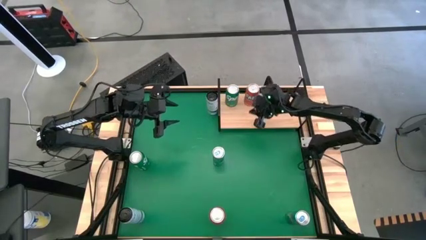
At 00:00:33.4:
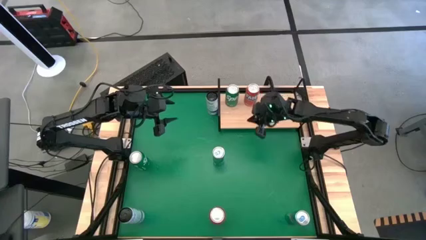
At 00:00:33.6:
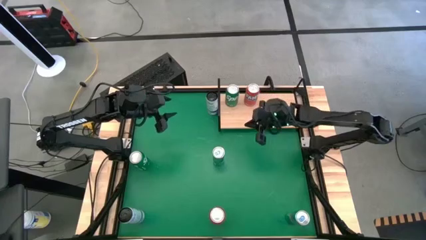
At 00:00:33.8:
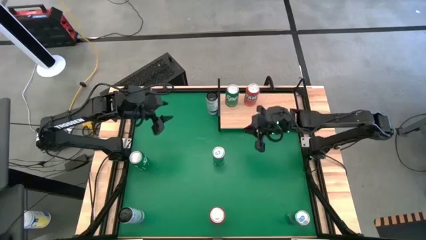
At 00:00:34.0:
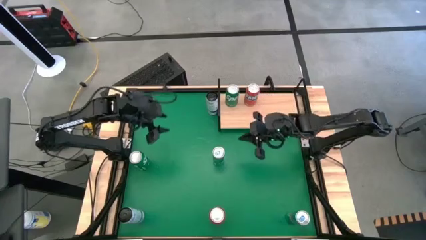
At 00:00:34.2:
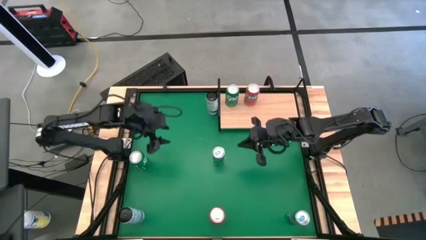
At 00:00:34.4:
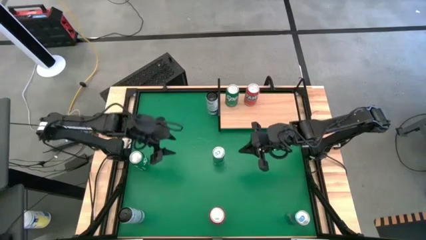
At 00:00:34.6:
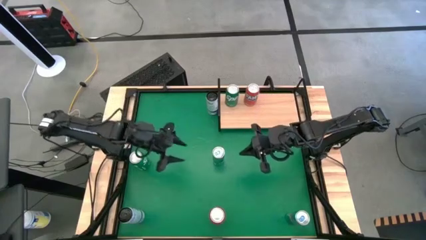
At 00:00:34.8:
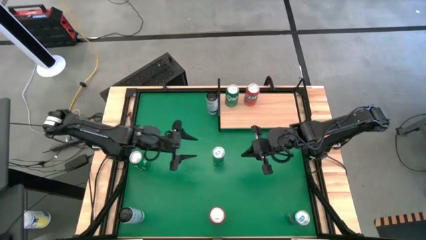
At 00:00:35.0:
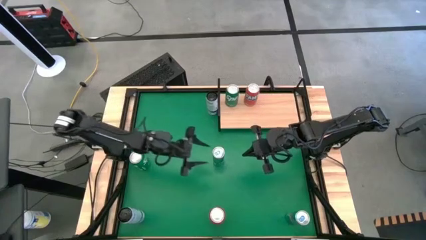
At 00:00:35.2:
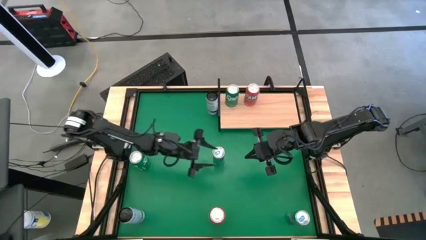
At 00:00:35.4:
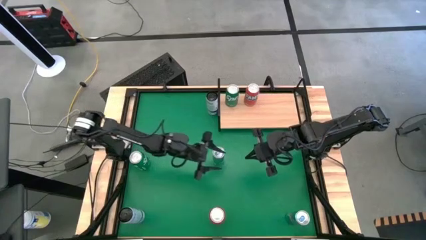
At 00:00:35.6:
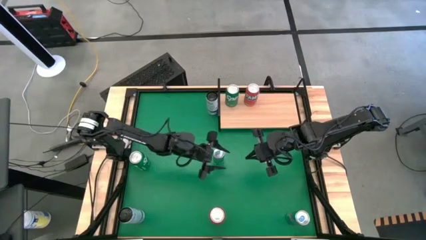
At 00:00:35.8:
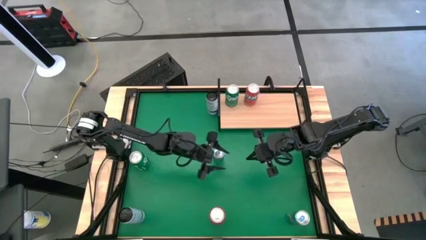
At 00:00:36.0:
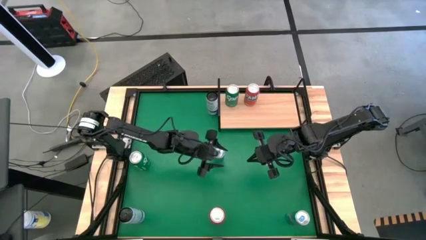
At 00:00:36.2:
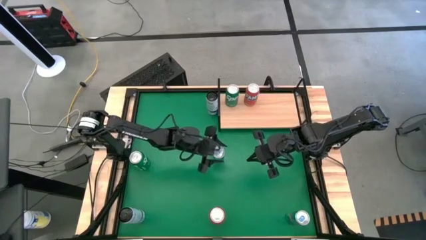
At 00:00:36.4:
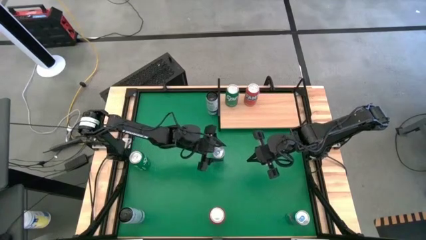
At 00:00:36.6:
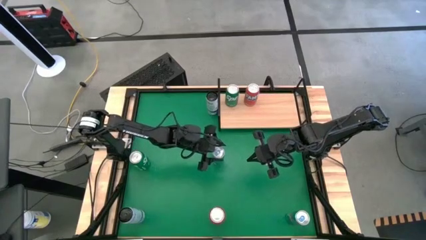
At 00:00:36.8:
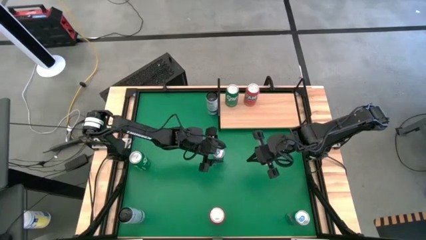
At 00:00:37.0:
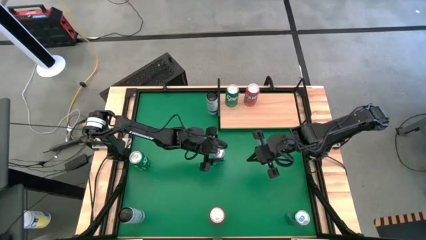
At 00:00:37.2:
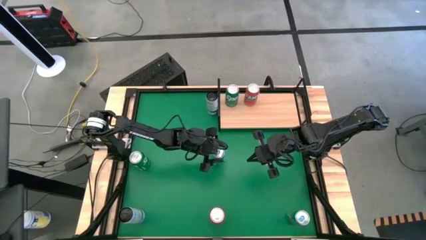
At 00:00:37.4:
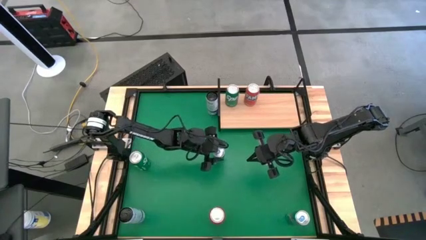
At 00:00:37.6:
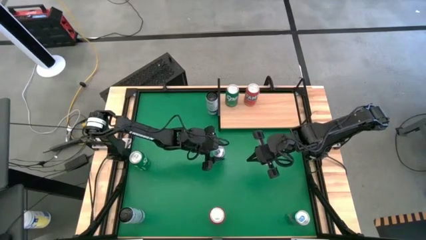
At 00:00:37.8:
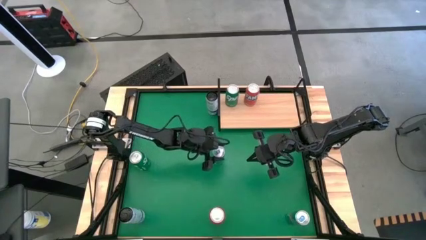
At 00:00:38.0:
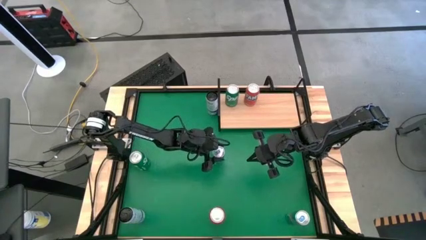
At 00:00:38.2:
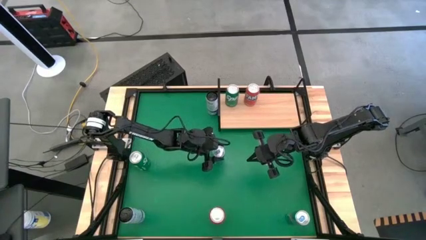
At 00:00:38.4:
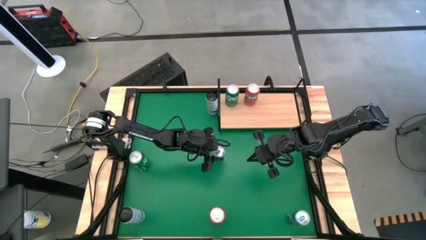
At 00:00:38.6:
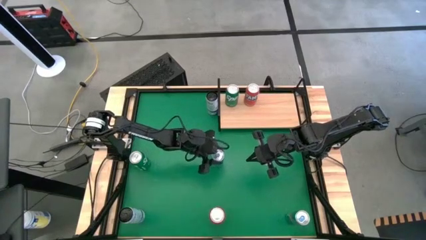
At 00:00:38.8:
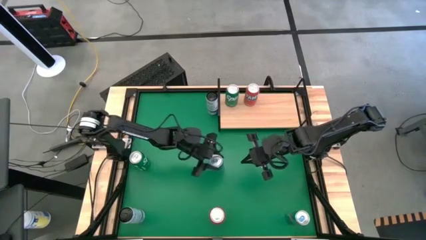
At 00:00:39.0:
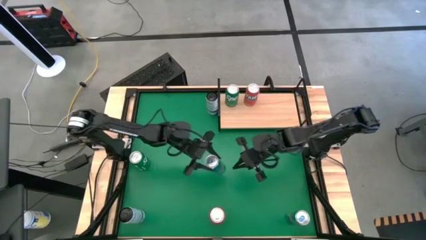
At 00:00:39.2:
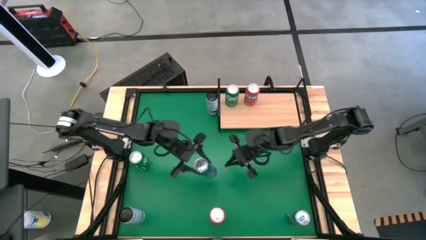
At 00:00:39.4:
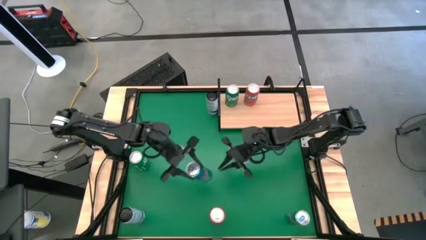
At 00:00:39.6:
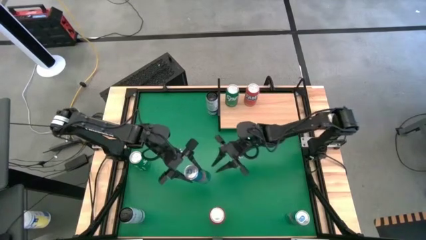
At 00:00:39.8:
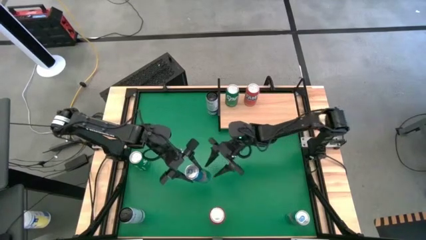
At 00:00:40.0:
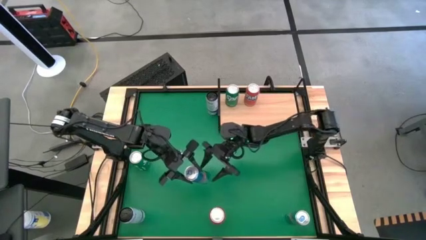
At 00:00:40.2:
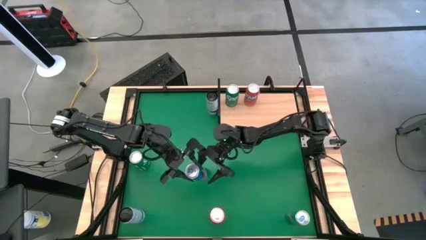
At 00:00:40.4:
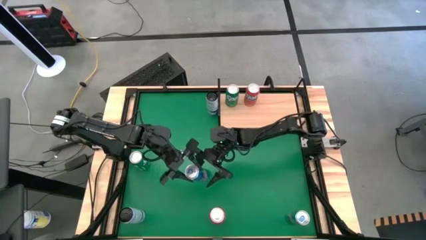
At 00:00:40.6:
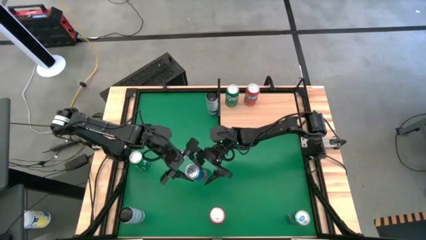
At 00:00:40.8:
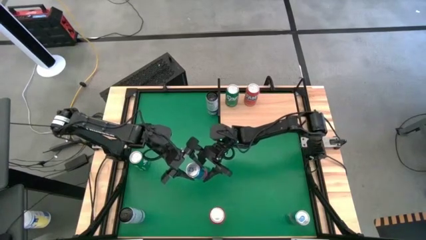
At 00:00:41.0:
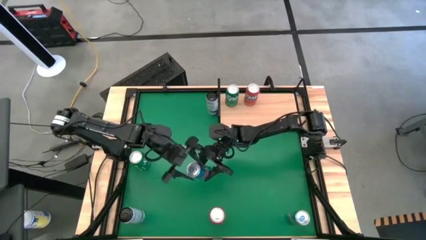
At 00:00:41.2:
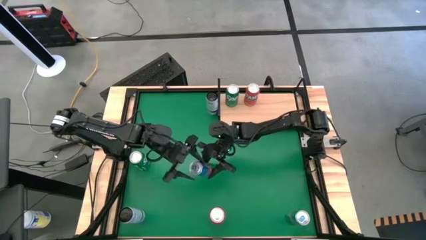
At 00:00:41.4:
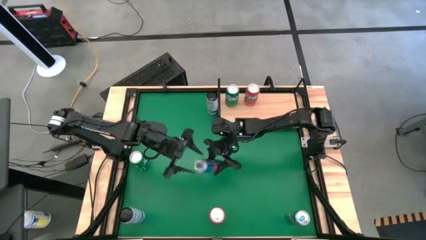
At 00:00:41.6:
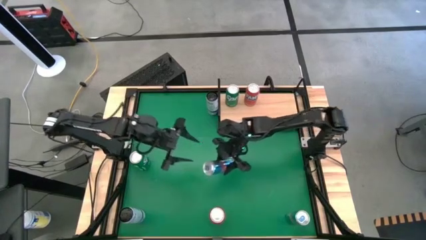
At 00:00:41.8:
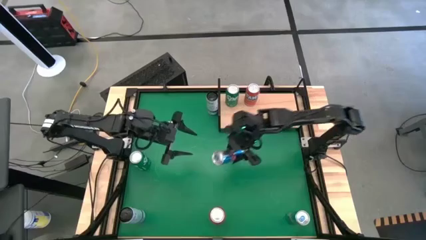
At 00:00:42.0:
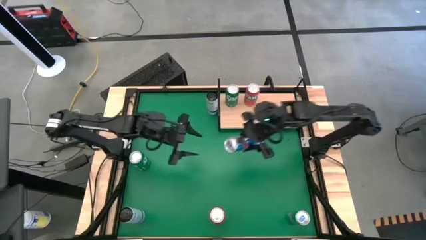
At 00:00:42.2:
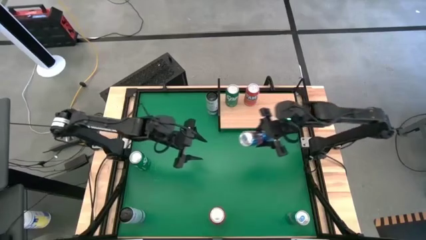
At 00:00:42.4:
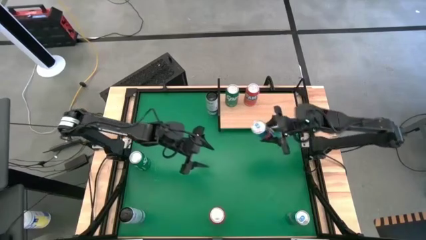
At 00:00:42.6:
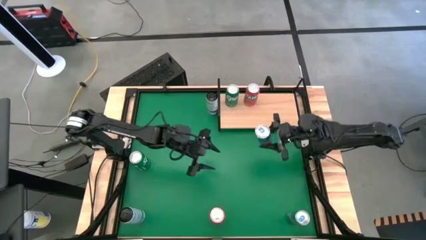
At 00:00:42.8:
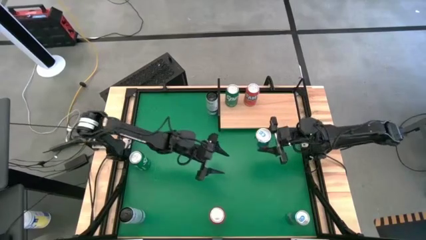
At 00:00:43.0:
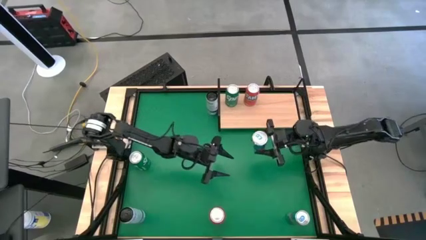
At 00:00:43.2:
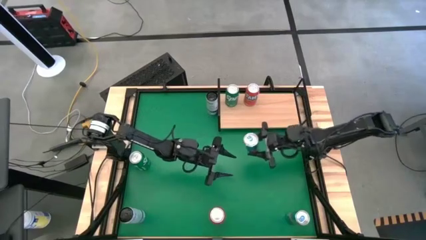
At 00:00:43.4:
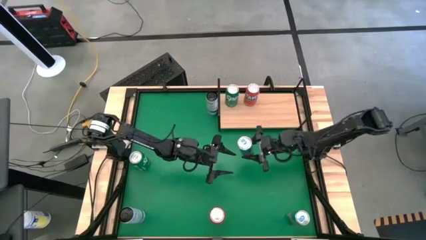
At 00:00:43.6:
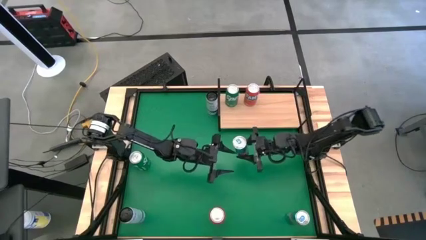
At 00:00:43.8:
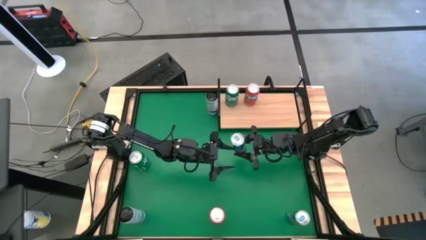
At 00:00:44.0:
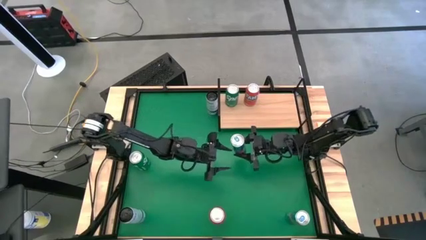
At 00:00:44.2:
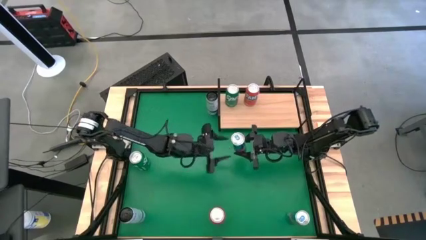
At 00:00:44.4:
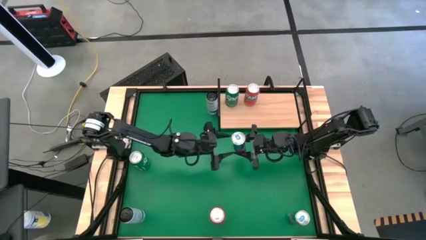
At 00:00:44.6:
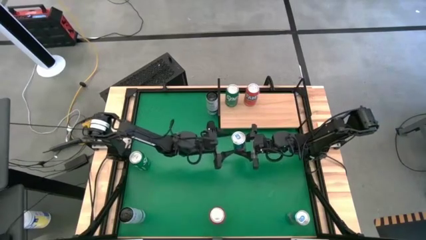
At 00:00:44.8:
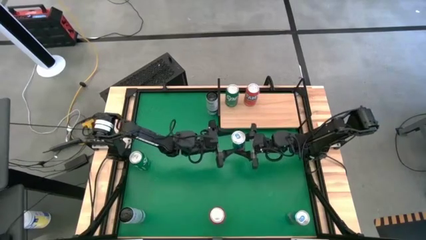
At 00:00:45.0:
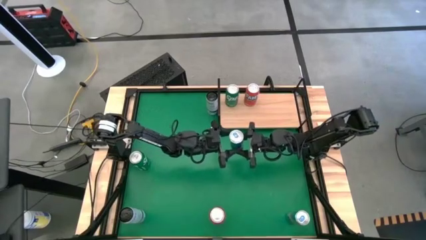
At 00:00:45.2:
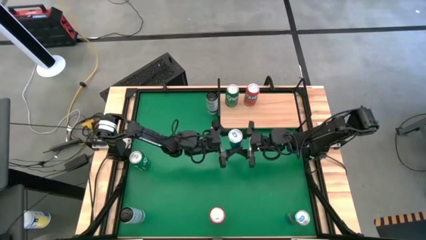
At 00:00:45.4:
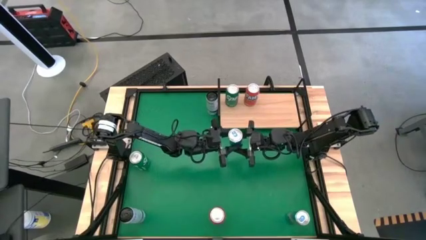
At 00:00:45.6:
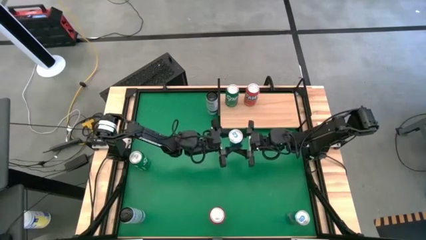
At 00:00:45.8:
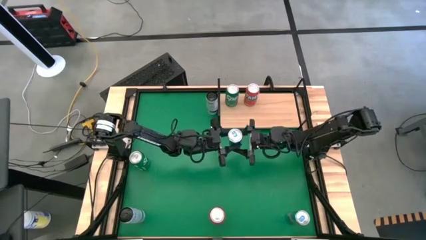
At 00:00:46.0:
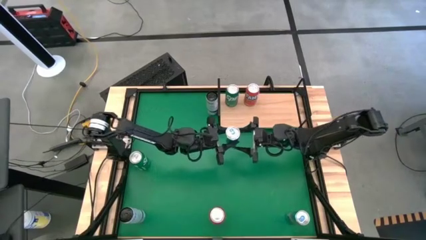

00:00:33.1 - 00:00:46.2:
Task: Place canned beverage on shelf
Put the top blue soda can on the shelf
